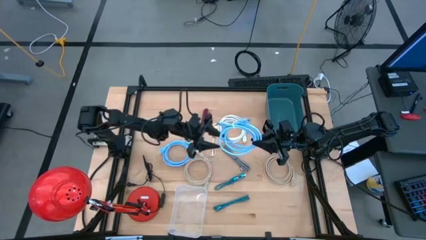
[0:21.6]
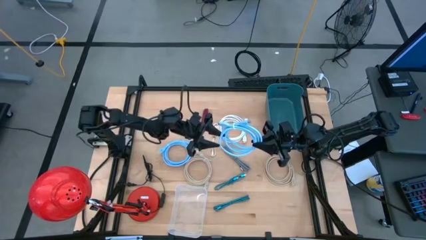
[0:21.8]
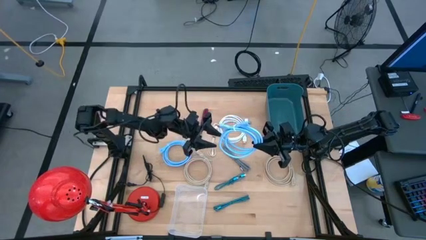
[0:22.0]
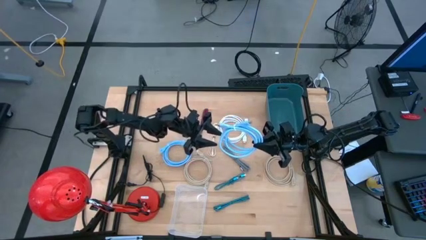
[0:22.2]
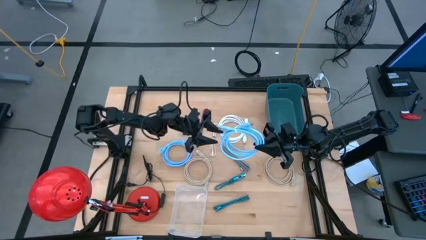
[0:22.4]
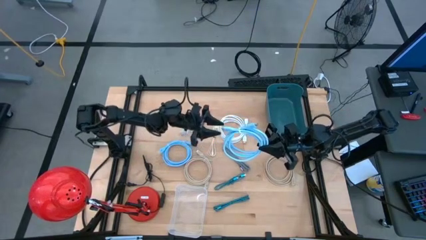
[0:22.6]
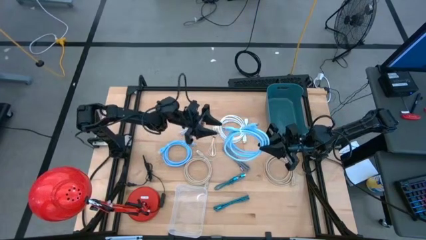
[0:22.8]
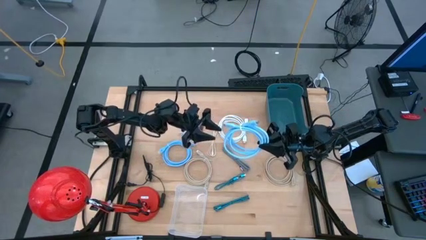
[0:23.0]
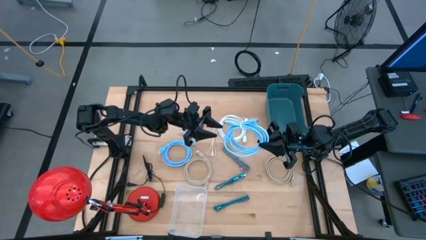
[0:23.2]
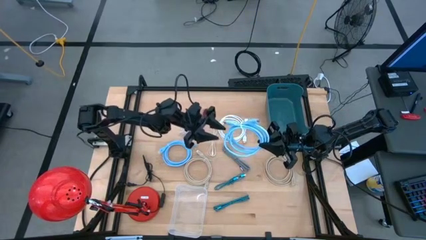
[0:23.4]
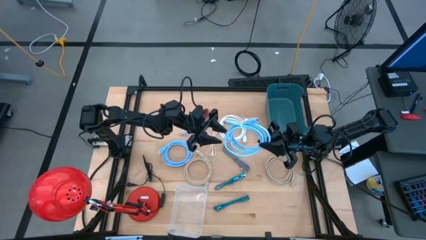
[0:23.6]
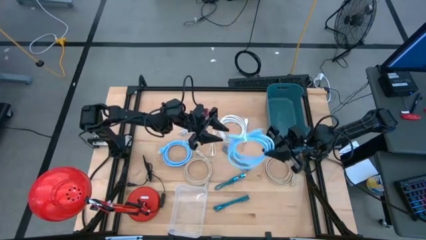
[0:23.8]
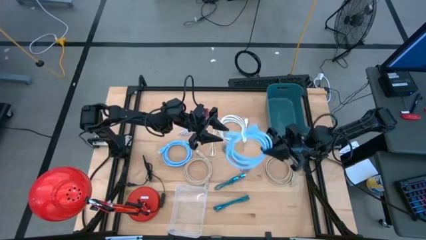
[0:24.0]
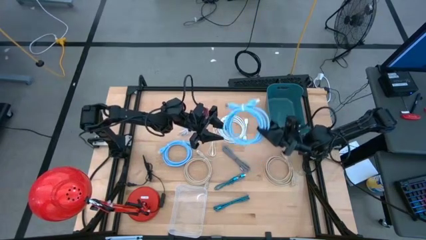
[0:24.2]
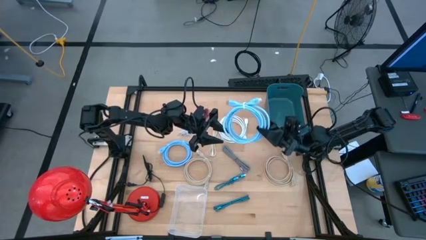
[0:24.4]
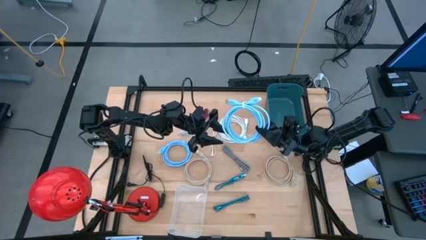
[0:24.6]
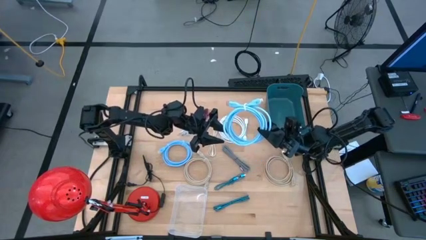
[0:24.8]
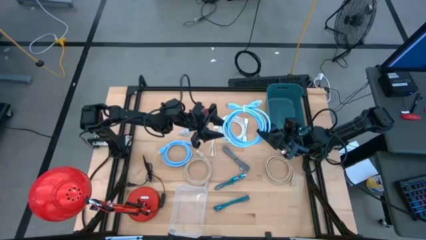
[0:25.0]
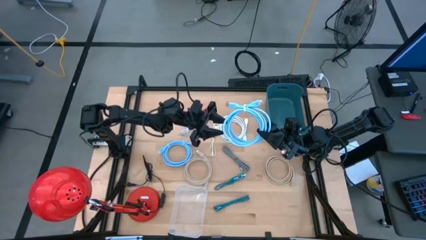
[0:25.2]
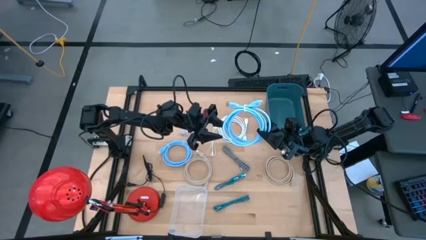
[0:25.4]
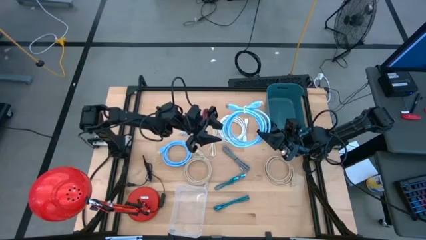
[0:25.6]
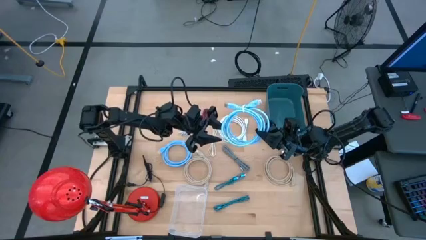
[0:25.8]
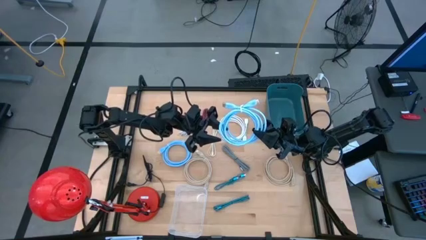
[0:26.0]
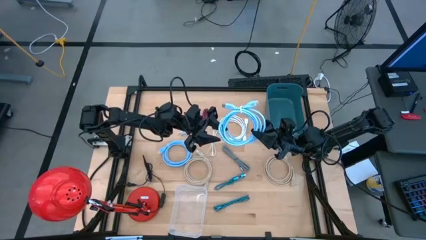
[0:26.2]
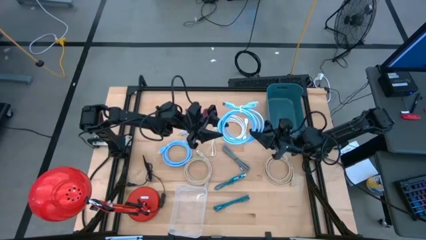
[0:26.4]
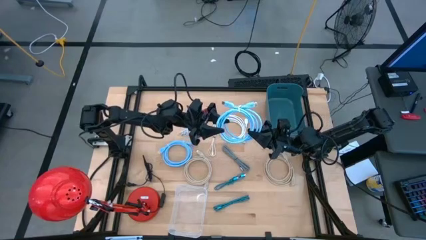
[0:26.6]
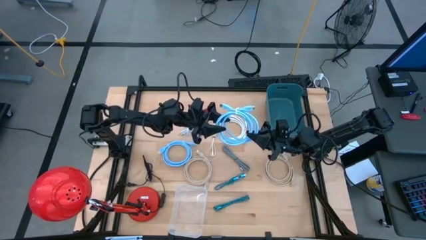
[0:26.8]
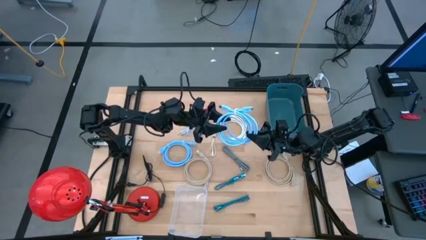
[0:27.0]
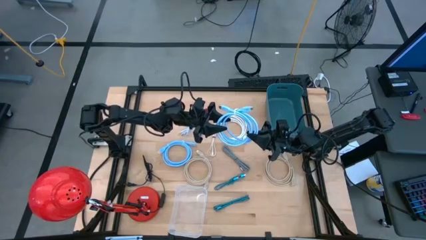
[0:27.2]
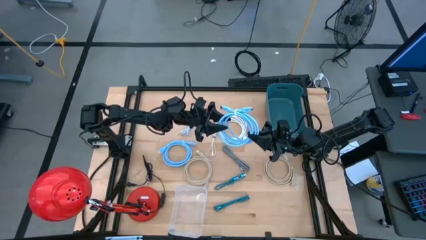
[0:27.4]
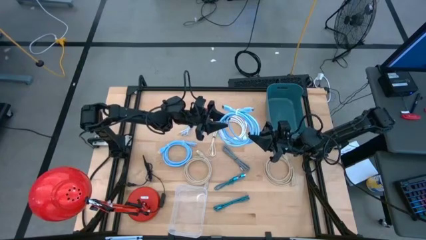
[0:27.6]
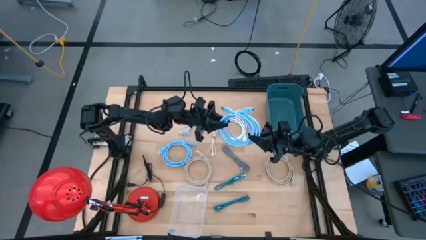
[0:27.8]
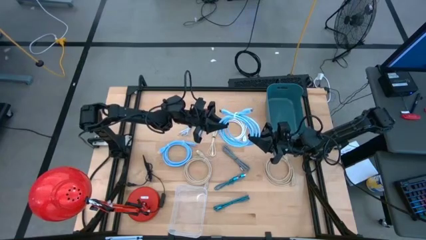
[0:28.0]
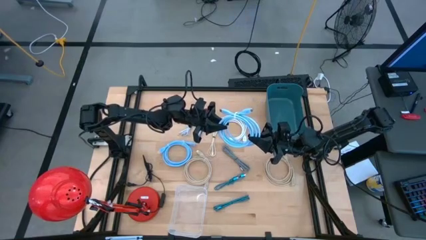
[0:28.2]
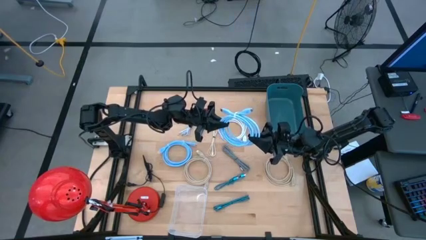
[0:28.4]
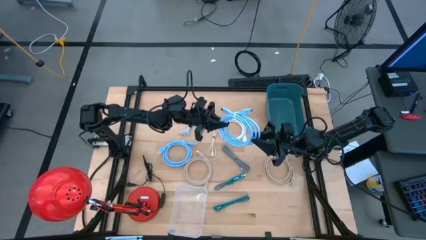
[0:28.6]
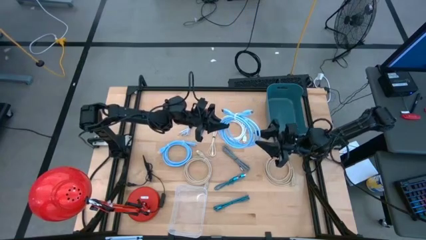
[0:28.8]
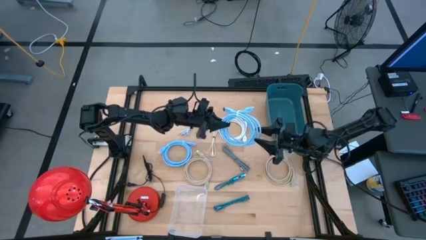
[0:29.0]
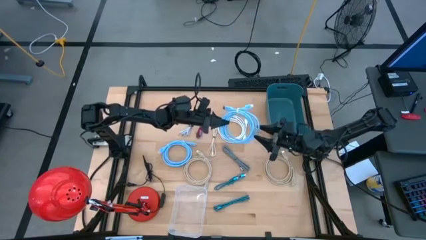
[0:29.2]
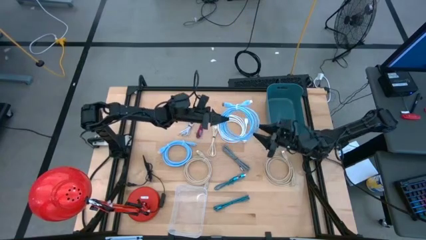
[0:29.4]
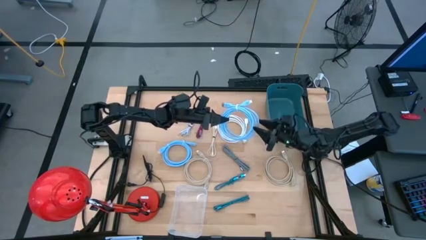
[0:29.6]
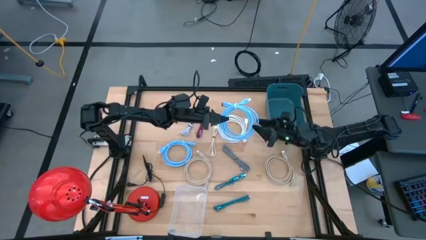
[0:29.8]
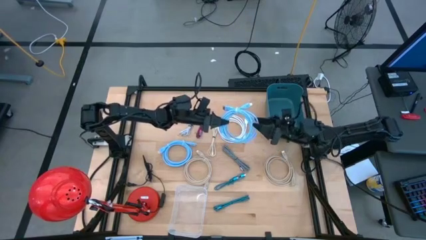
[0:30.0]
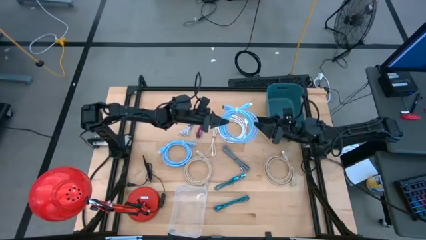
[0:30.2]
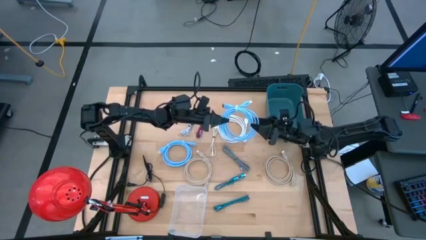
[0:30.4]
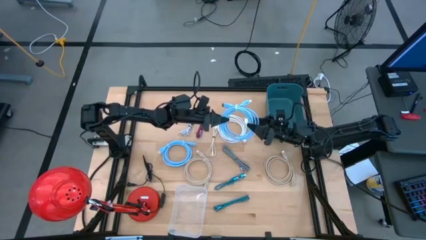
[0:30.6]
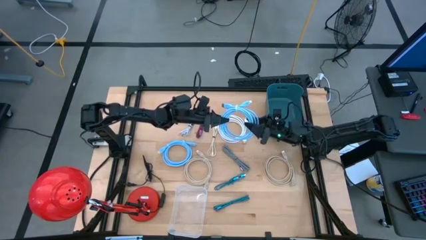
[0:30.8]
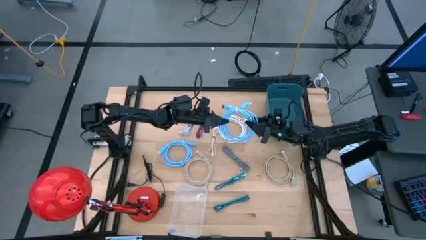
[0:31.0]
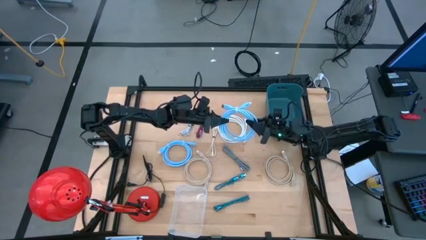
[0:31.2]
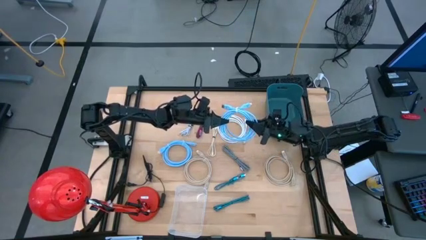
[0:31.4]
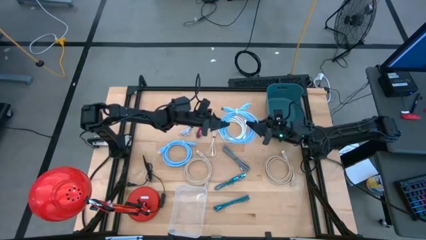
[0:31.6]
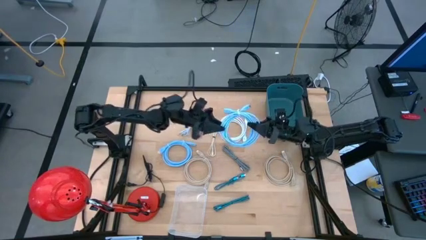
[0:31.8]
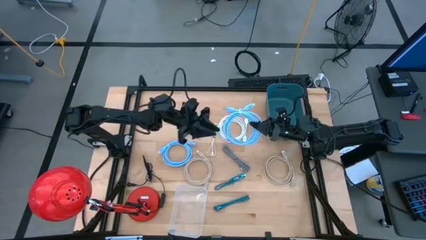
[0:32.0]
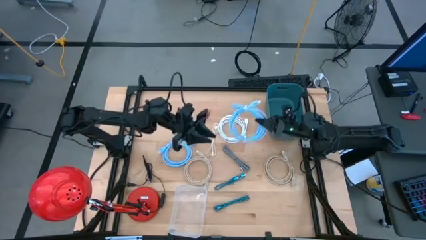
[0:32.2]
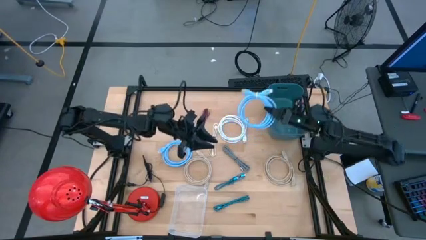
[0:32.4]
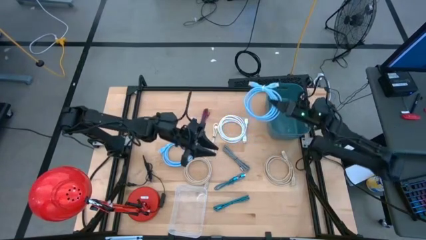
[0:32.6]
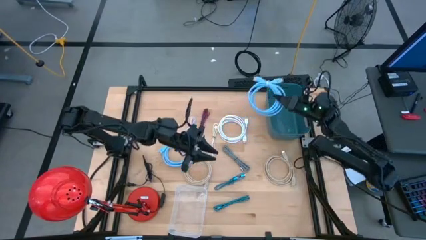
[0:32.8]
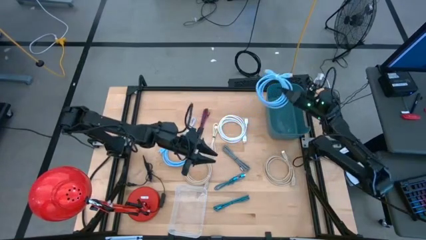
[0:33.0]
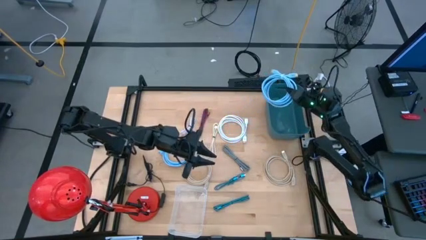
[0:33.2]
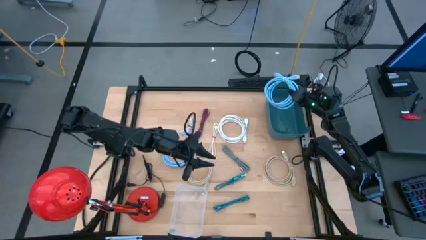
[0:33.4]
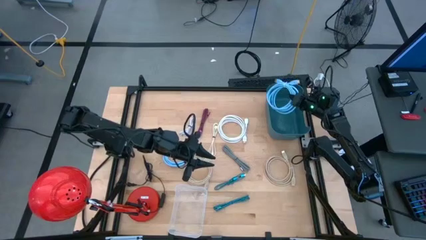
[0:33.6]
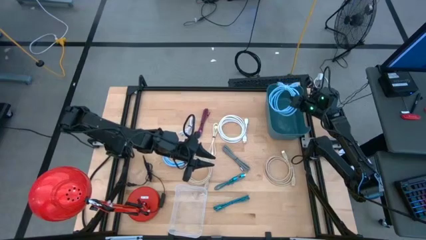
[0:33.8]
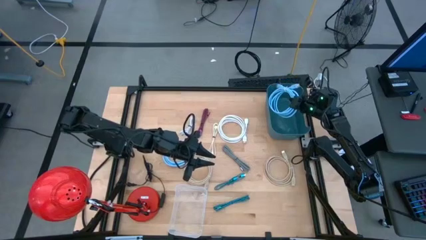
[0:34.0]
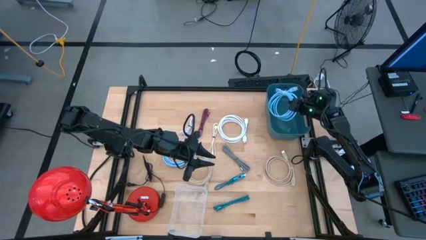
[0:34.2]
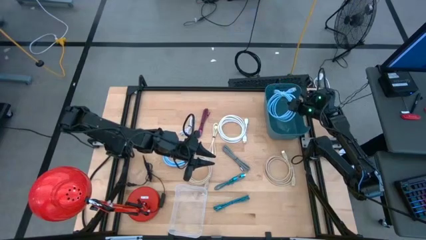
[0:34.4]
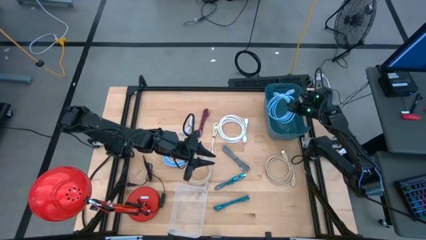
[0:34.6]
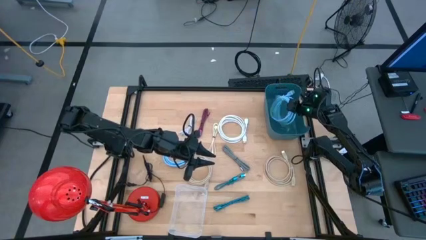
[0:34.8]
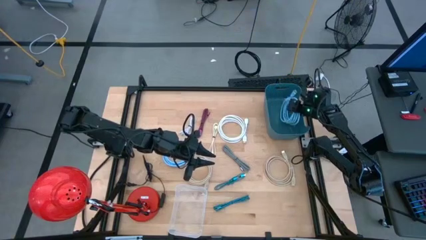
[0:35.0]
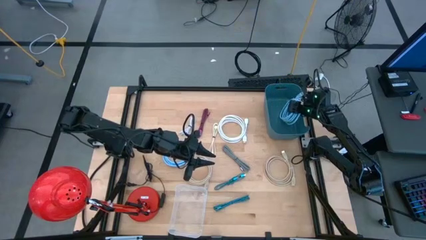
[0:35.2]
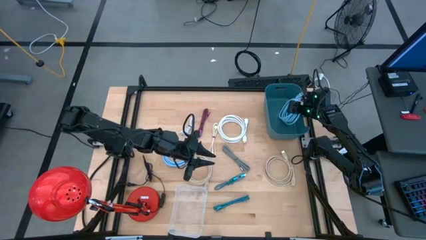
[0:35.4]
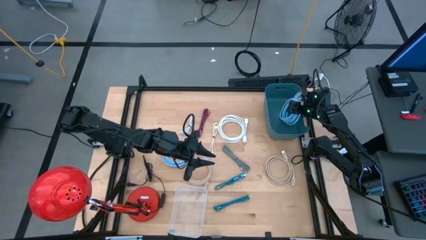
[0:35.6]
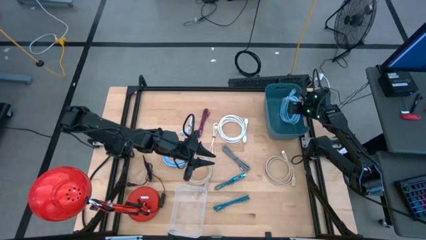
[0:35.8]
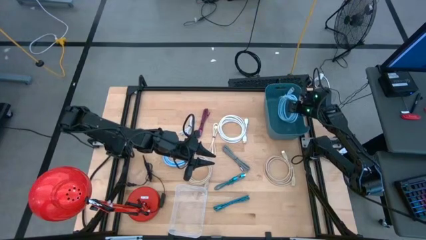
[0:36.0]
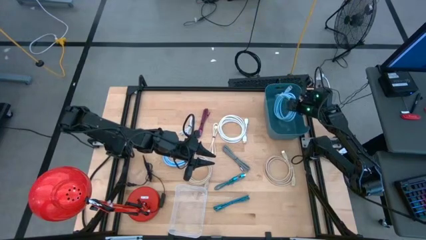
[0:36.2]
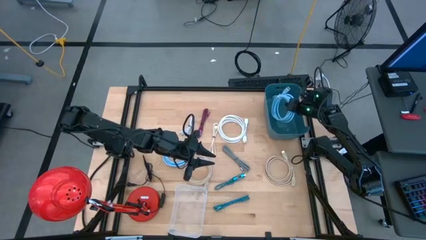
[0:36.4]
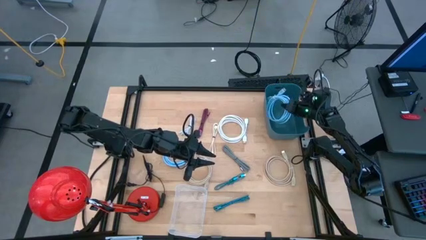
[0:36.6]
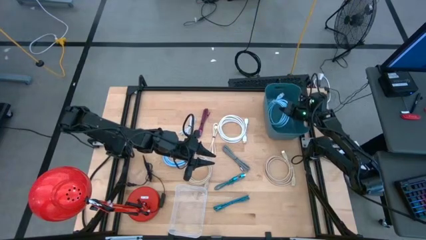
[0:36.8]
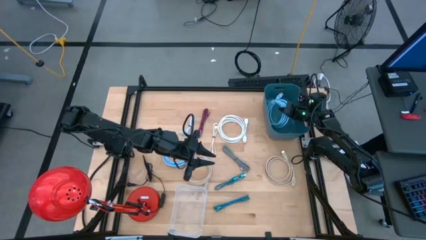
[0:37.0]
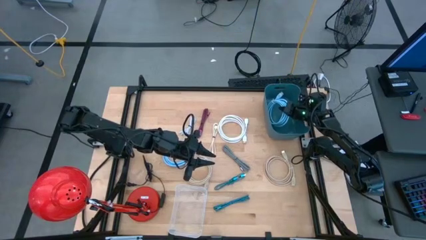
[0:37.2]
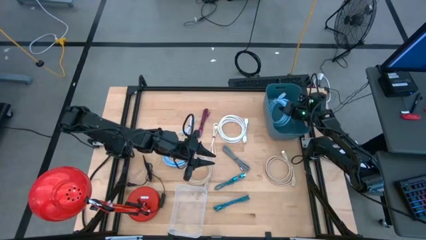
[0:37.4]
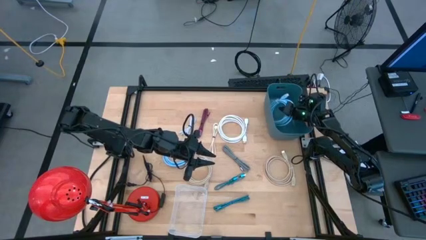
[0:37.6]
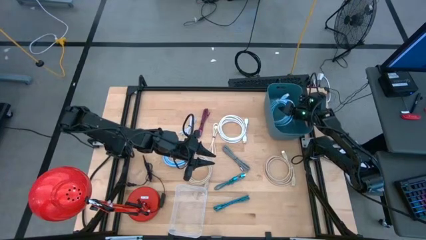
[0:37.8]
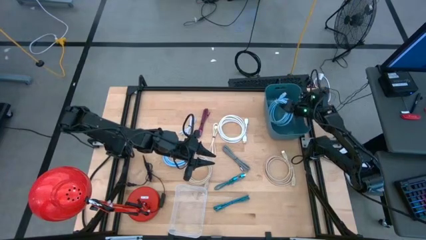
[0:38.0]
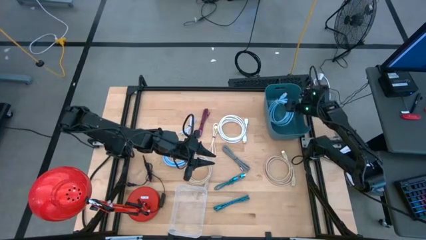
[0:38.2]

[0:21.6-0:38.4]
Task: Pick & Place USB Port
Put the top blue usb cable into the blue bin
